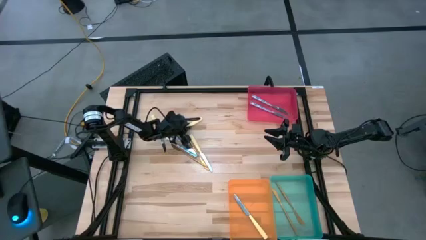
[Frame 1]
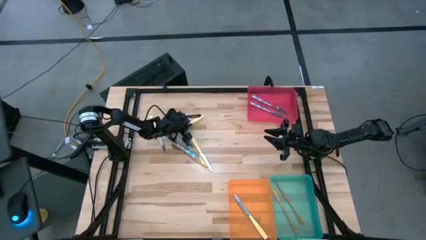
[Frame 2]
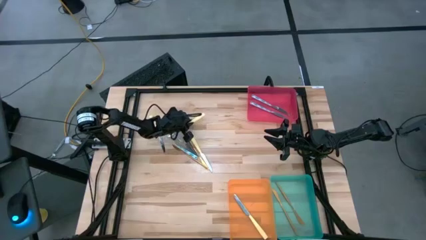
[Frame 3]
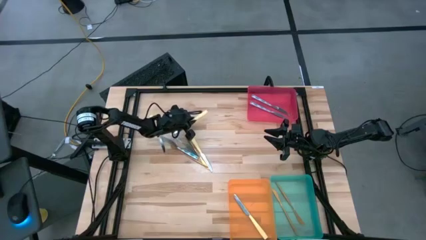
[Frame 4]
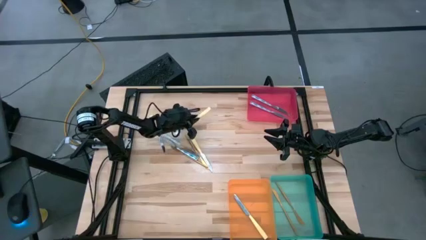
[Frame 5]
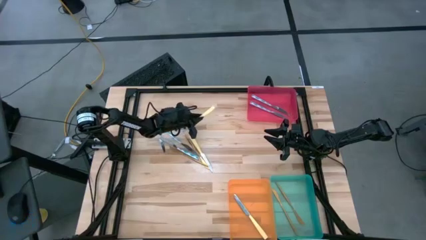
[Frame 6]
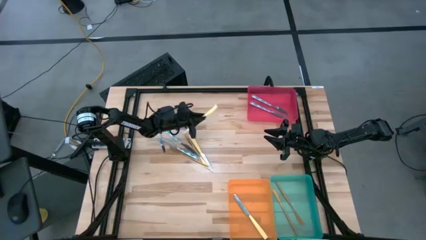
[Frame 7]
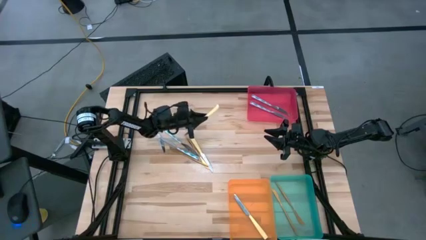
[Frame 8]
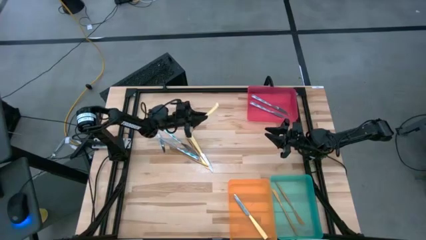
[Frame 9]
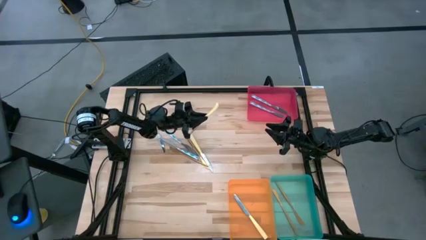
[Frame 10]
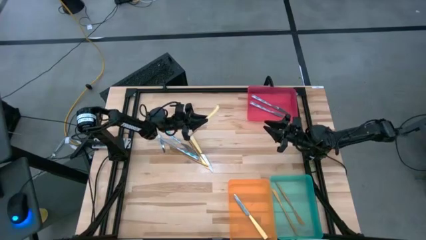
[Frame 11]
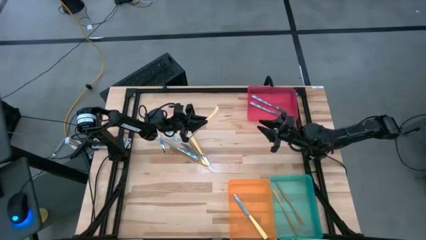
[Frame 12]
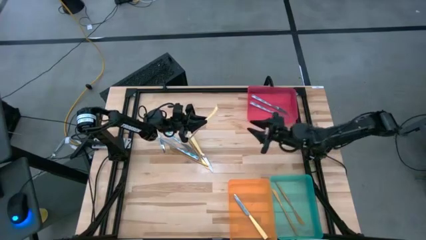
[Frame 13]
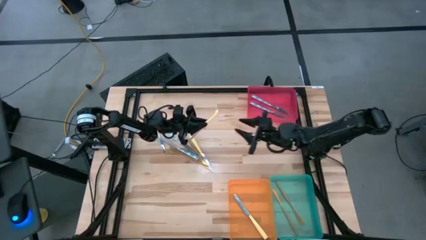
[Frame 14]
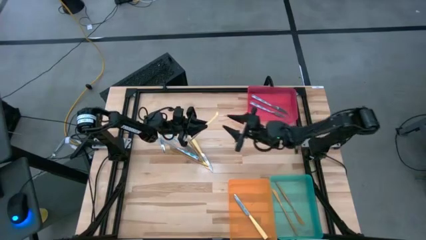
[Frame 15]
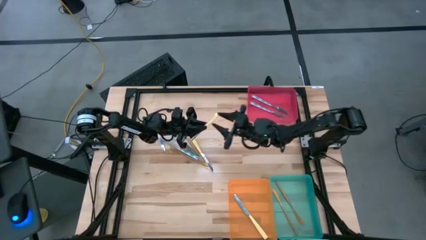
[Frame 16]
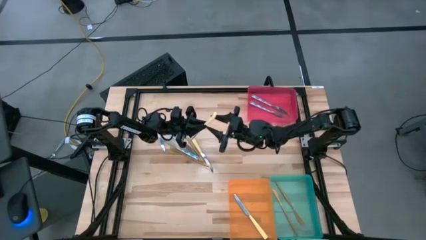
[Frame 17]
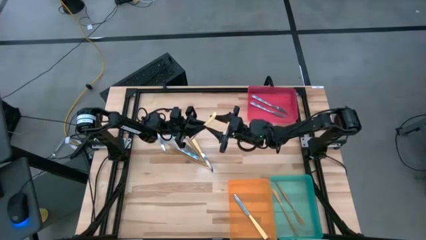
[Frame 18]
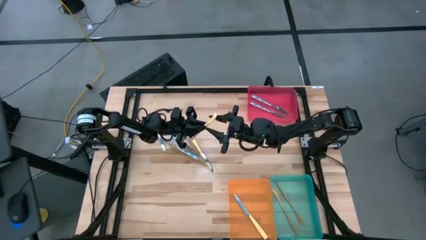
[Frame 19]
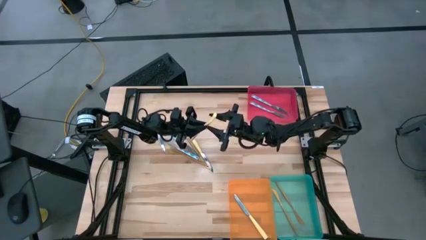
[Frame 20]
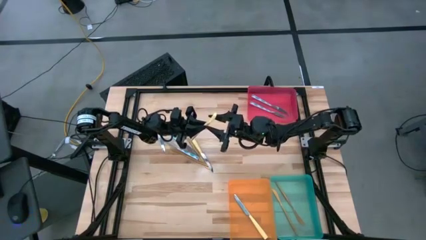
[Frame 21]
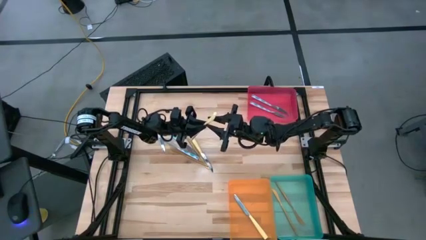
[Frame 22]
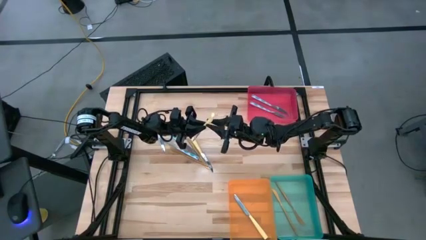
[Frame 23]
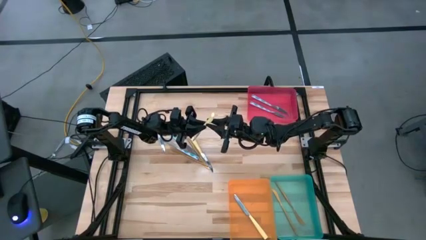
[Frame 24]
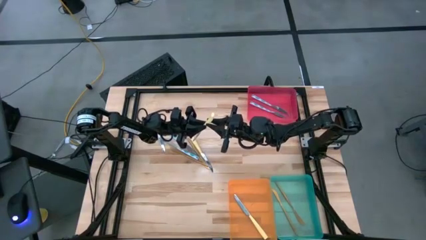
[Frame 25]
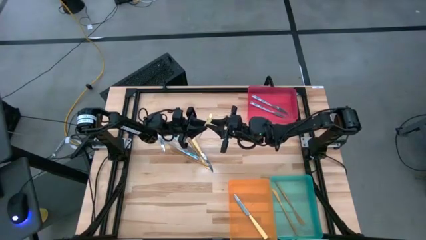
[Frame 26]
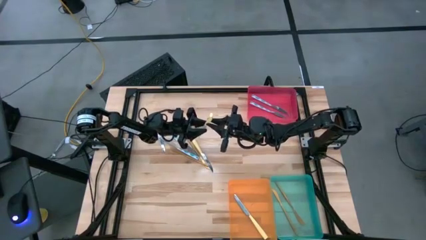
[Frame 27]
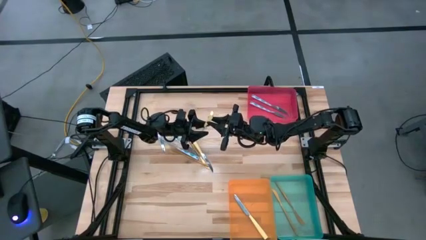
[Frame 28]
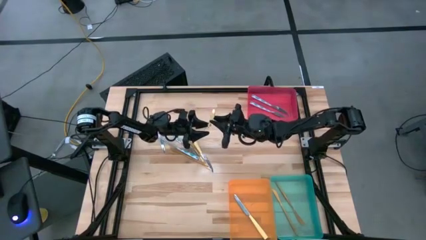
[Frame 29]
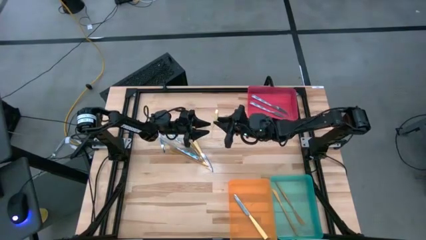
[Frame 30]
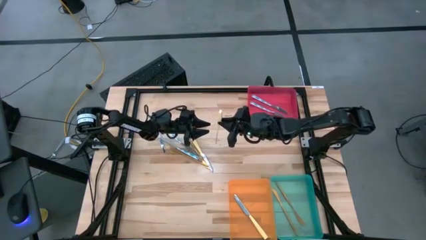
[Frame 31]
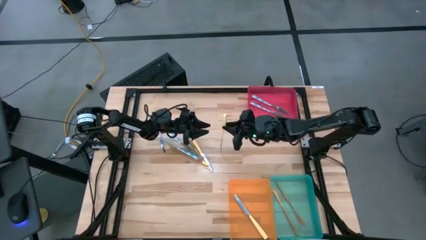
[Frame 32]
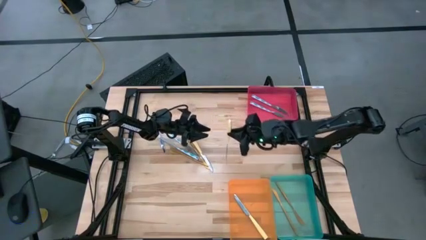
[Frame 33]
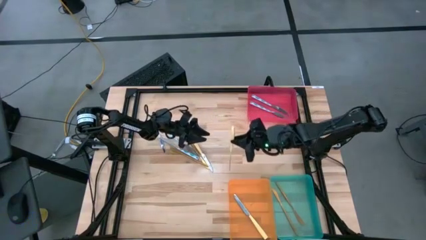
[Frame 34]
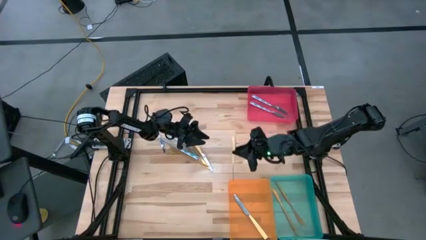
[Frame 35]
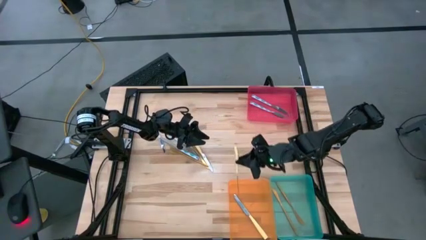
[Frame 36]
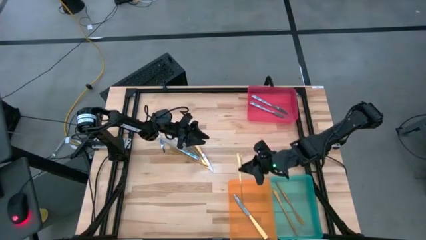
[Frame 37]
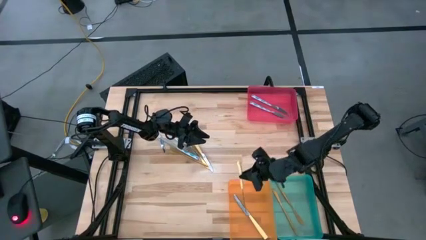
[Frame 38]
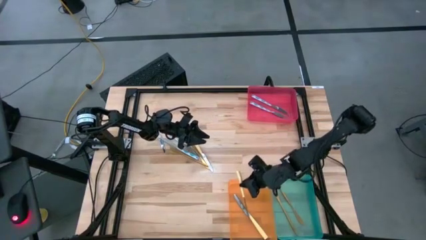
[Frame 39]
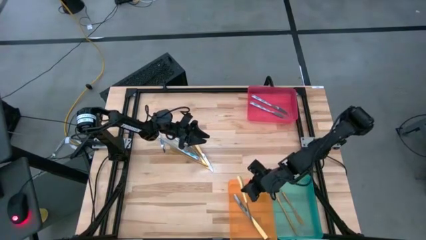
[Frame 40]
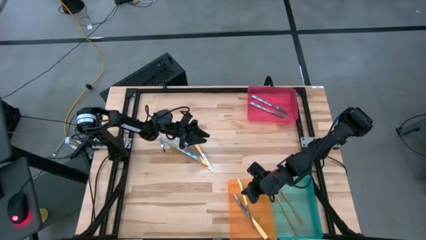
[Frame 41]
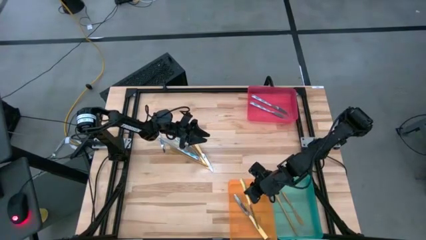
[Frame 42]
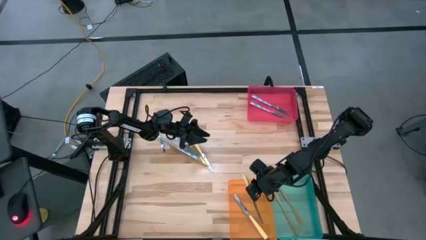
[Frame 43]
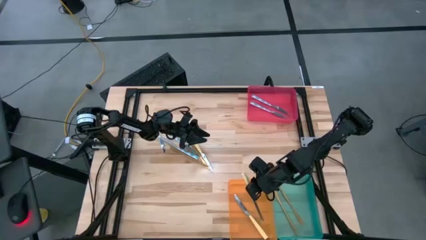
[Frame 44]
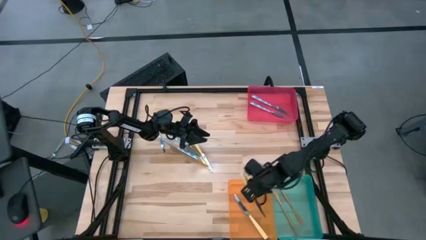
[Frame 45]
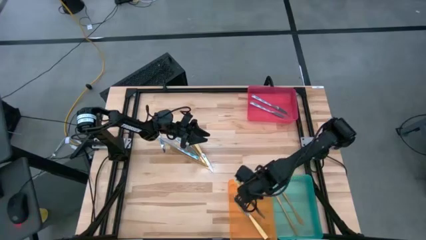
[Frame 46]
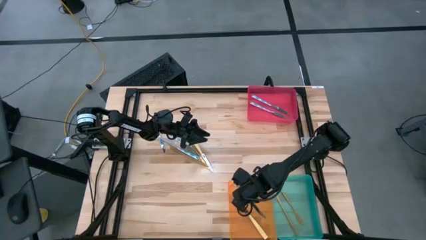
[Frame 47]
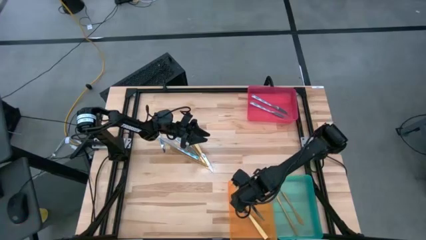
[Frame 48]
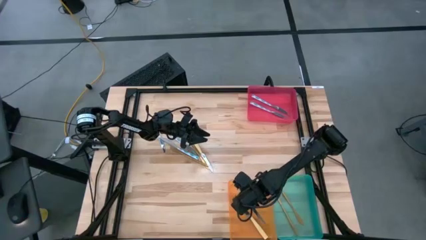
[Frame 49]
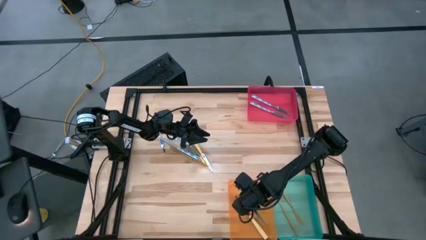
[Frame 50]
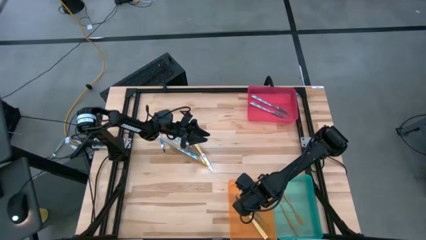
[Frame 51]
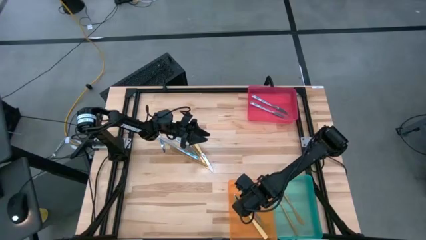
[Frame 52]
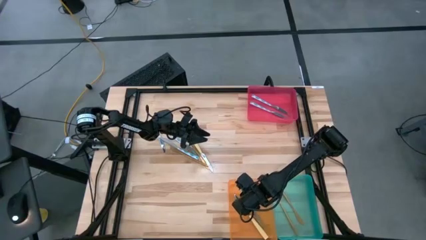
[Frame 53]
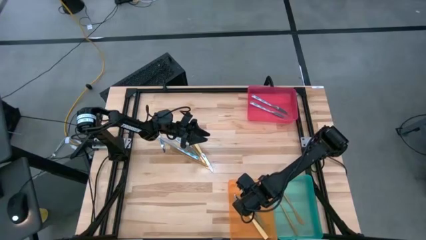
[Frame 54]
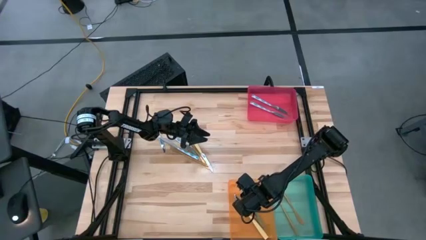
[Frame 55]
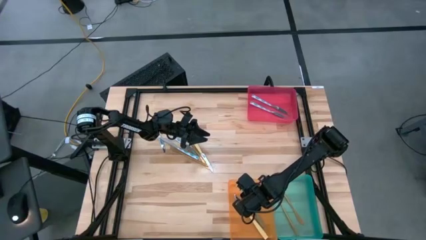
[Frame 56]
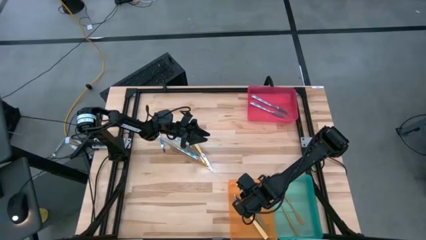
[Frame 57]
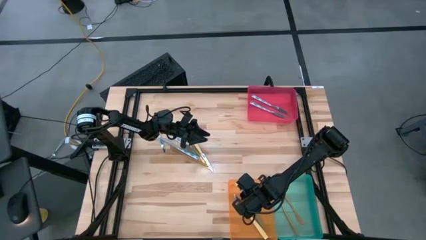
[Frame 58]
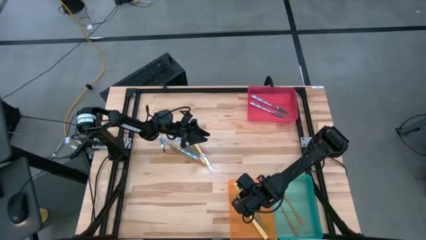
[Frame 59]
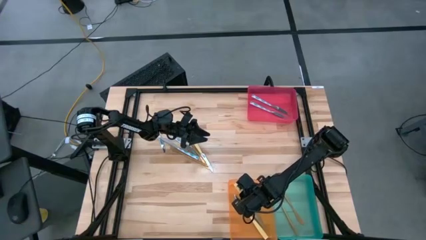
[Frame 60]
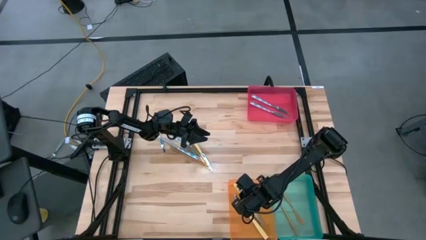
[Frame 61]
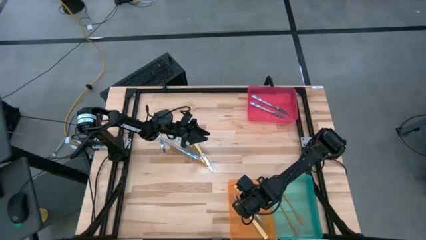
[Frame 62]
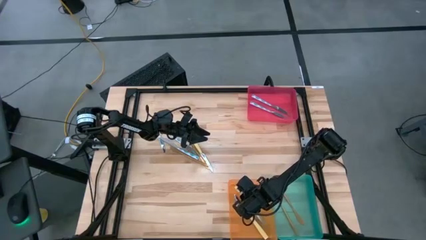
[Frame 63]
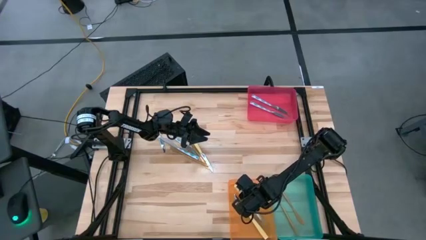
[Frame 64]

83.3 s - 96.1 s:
Task: Sort silverware by color (type)
Put the yellow knife into the orange bin
